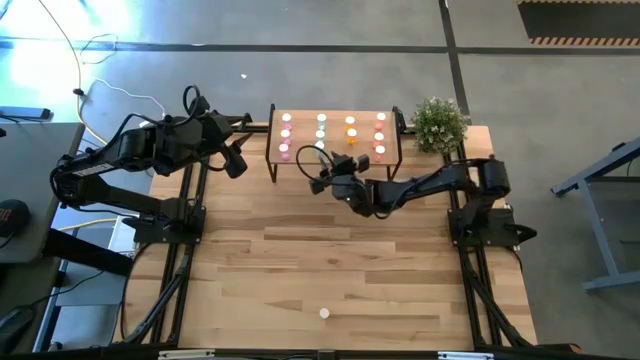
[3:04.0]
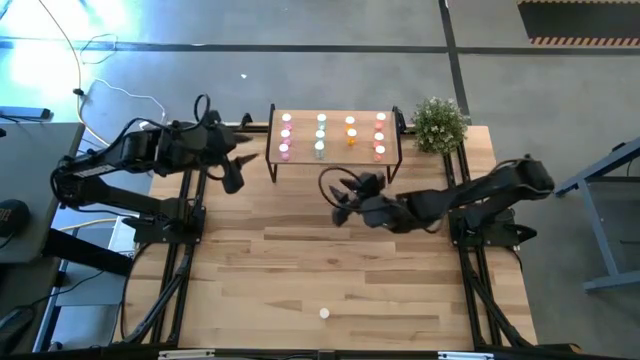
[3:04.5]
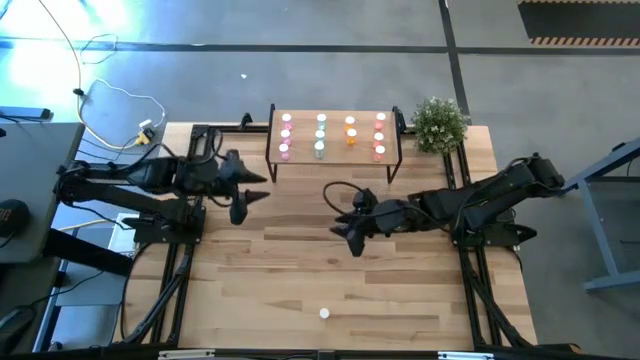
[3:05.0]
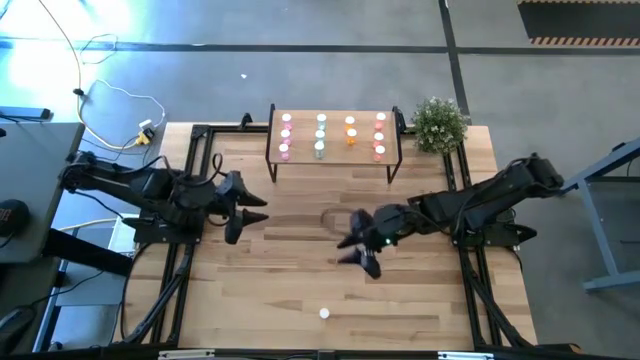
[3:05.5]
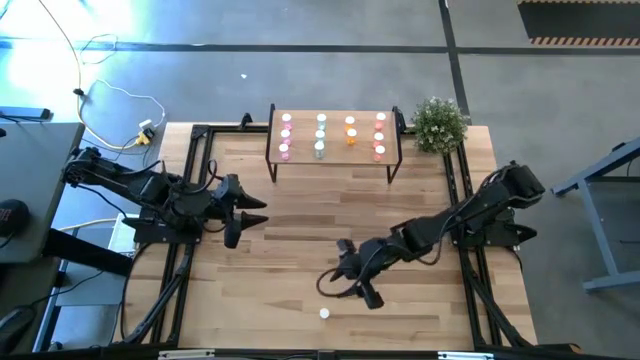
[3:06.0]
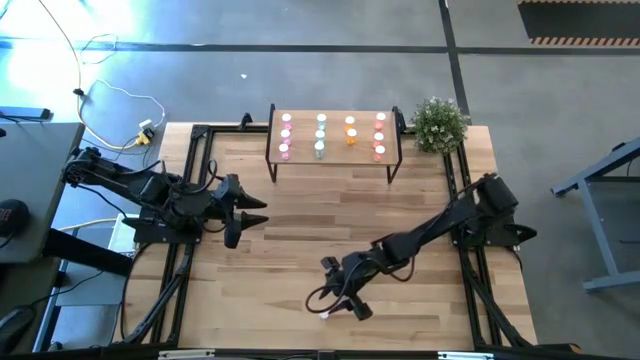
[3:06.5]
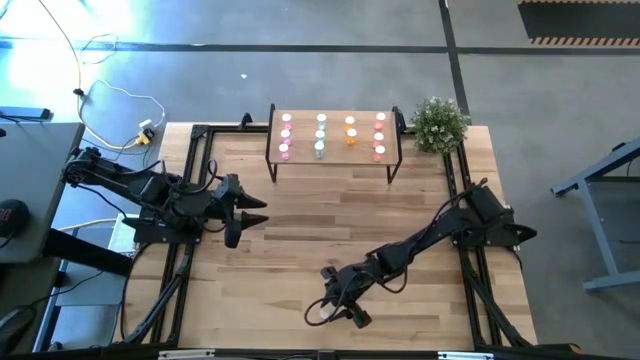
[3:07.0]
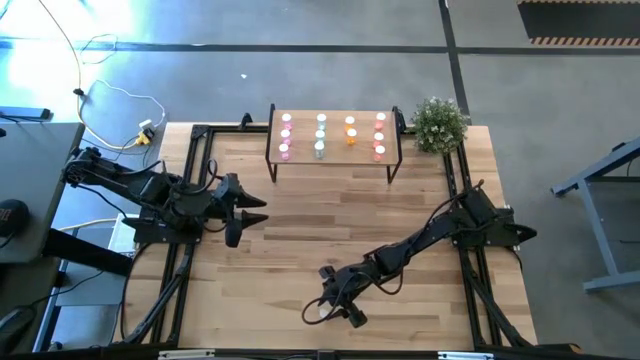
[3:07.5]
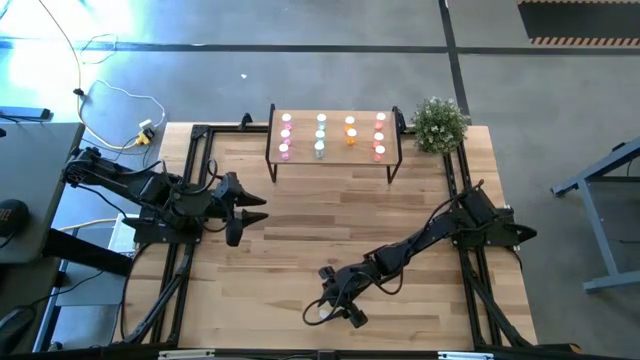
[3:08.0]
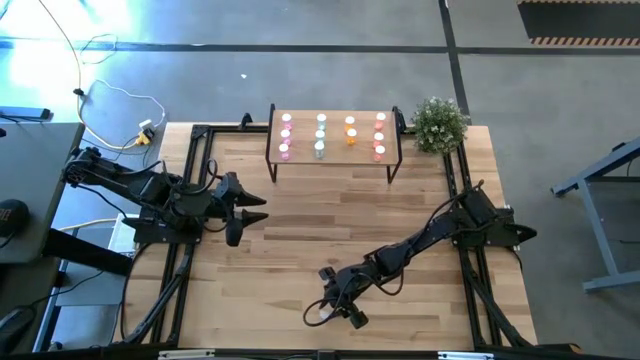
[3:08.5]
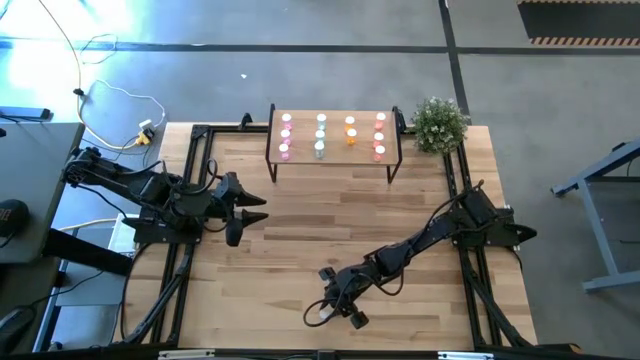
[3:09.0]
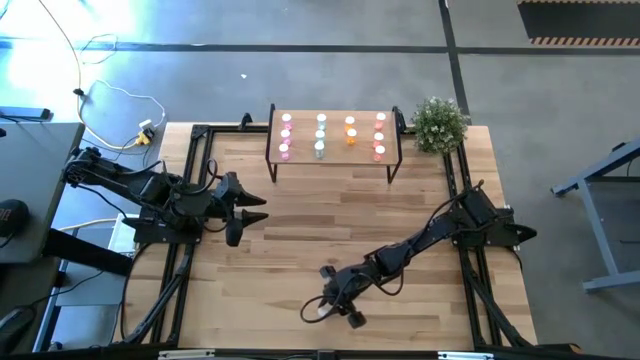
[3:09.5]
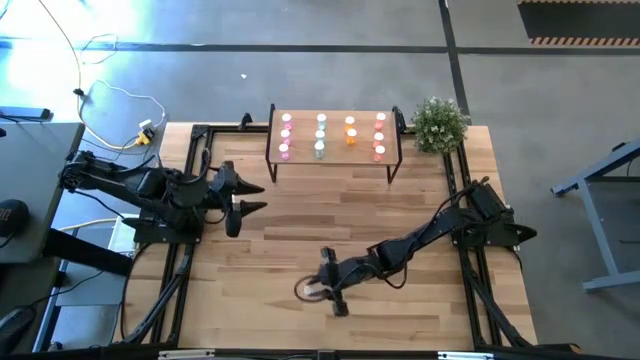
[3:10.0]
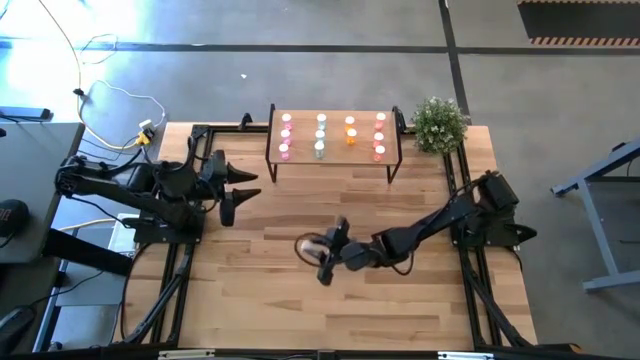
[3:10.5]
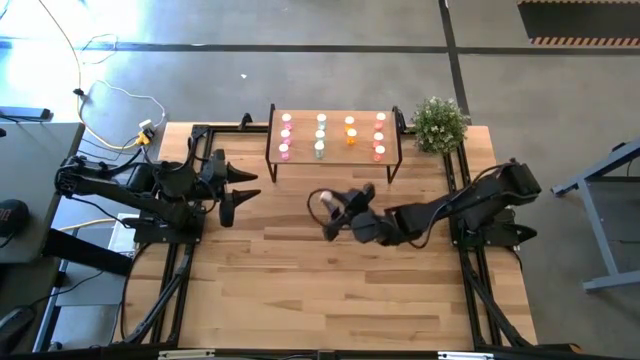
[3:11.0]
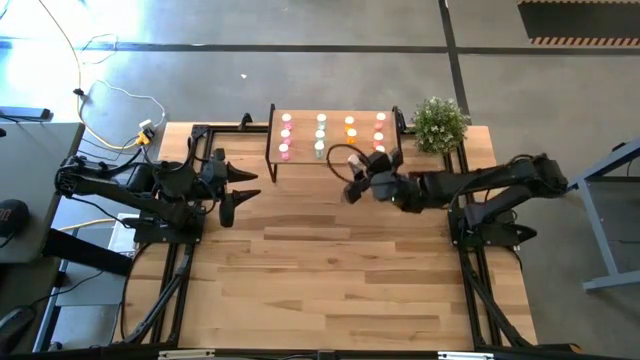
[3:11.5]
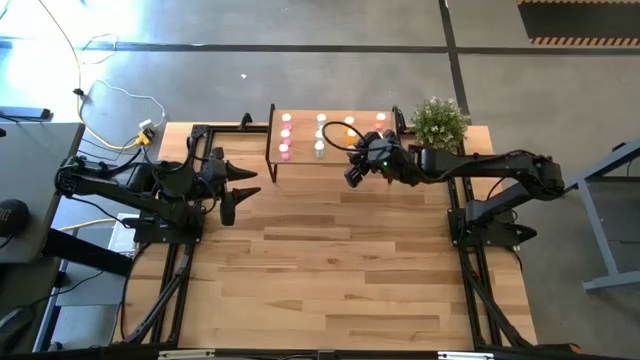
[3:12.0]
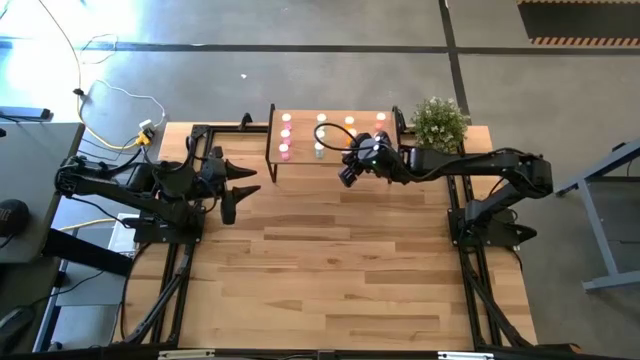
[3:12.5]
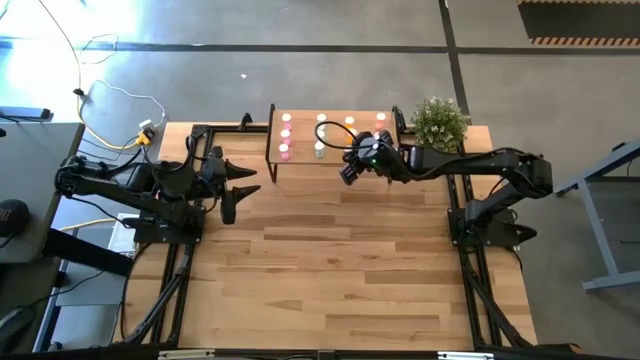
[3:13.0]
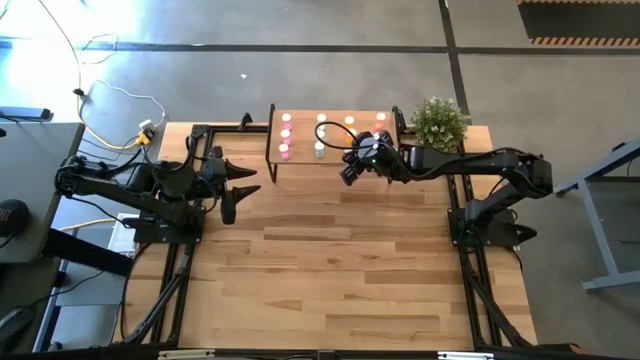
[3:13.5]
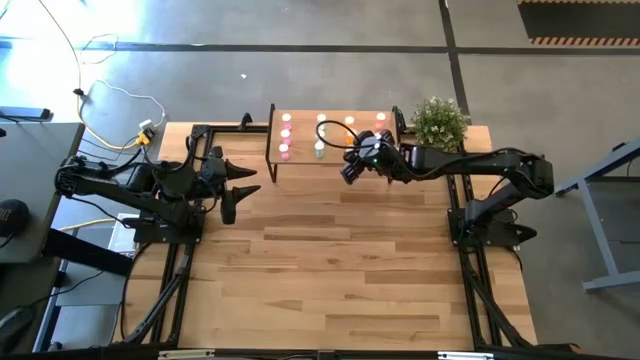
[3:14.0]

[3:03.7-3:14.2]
Task: Pick and place medicine bottles onto shelf by color
Put the yellow pill bottle on the shelf aligned with the yellow pill bottles

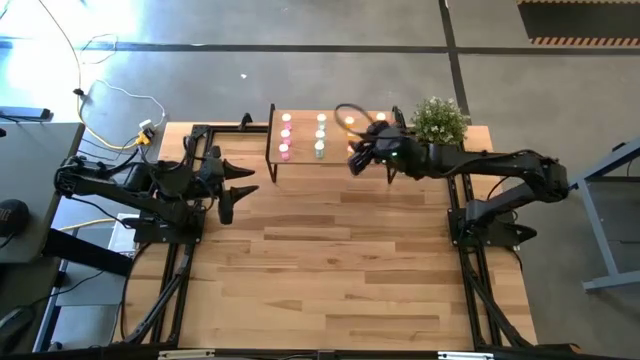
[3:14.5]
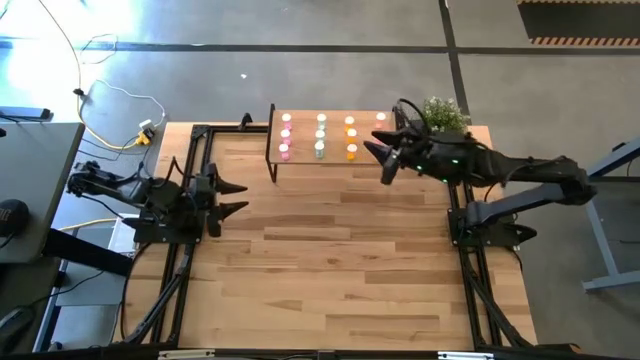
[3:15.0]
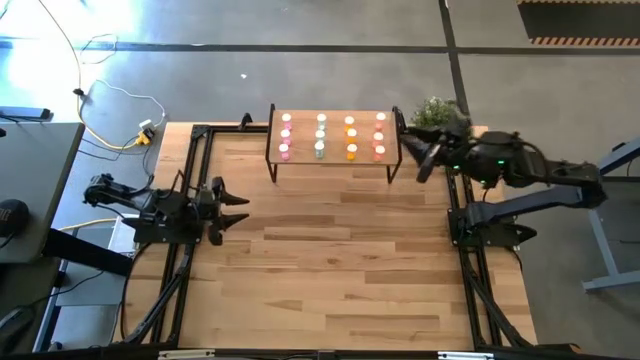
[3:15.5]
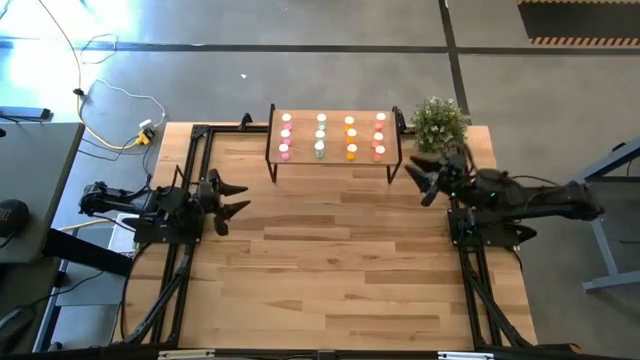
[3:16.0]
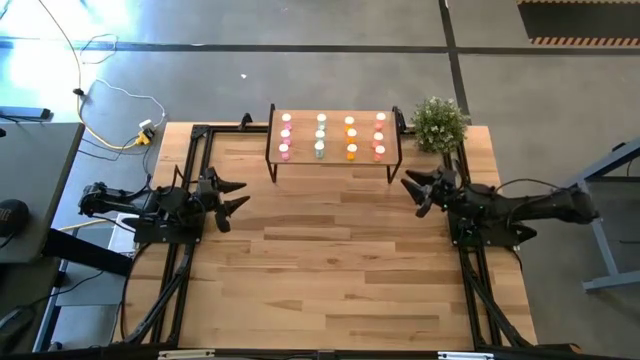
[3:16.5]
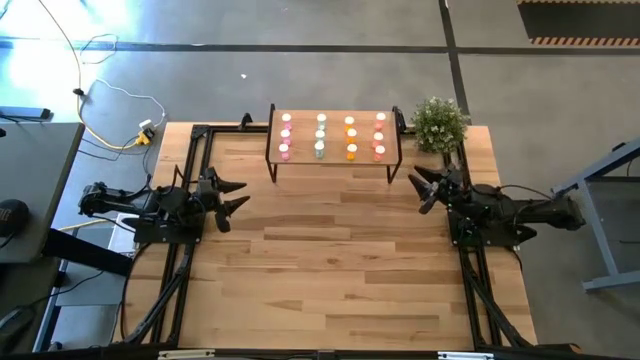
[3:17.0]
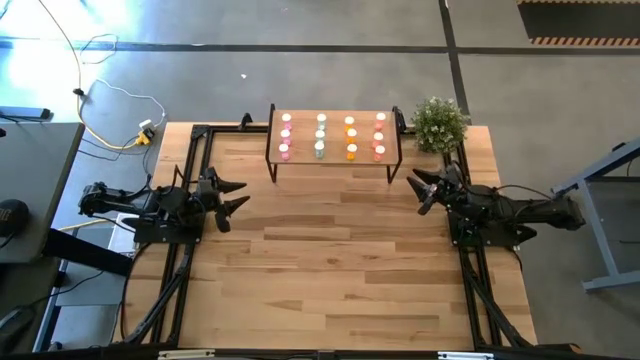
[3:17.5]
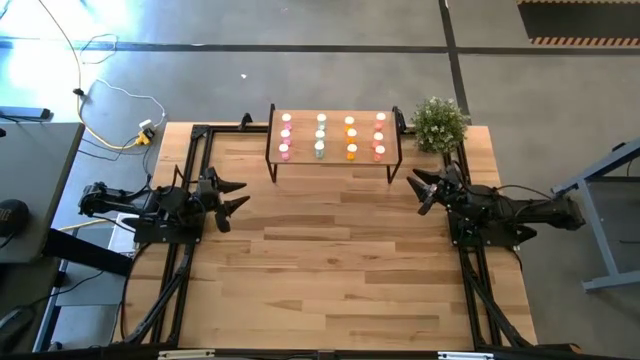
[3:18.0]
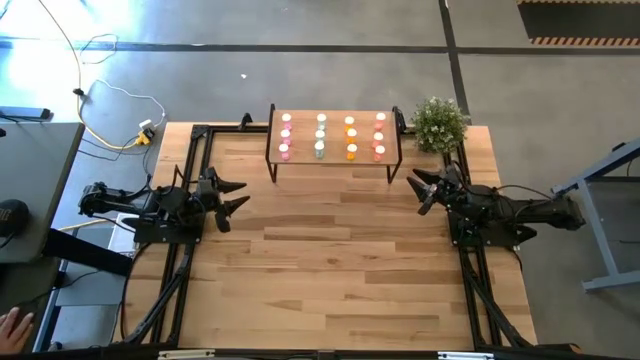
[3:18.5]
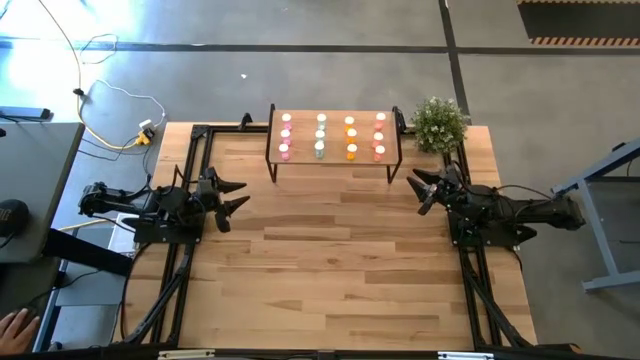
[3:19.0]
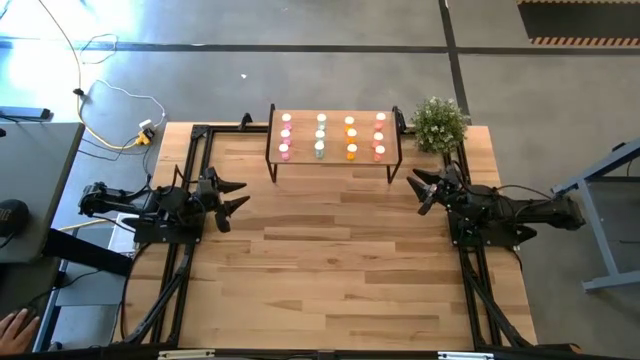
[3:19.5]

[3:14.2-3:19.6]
Return to Home Position

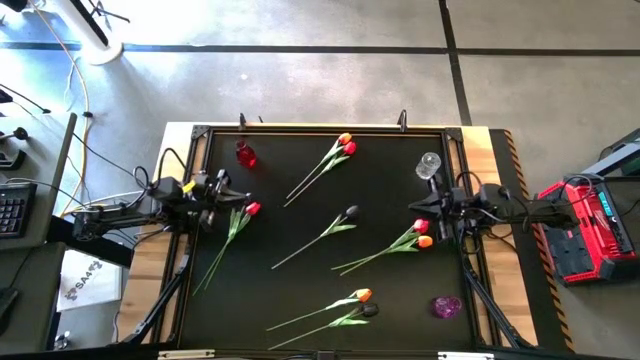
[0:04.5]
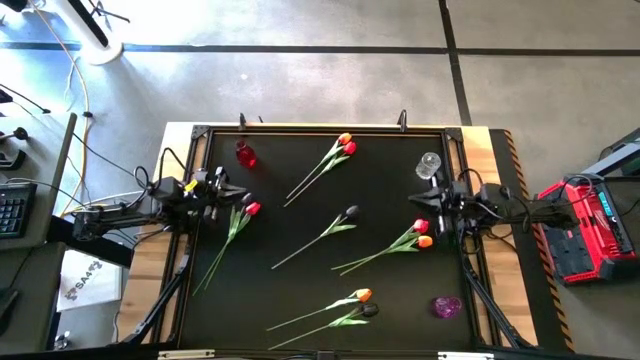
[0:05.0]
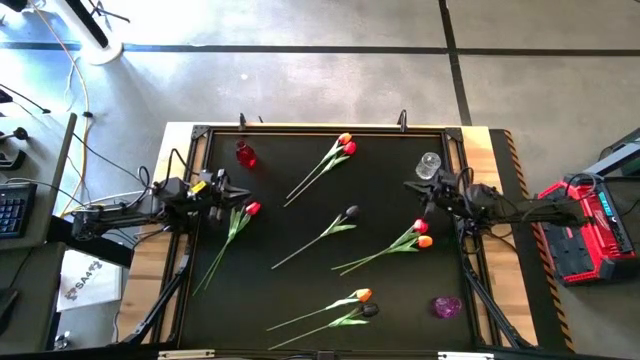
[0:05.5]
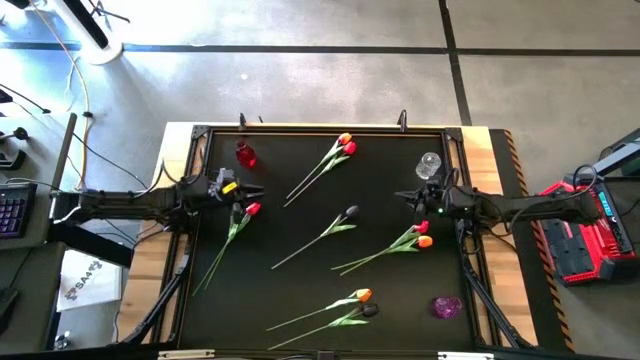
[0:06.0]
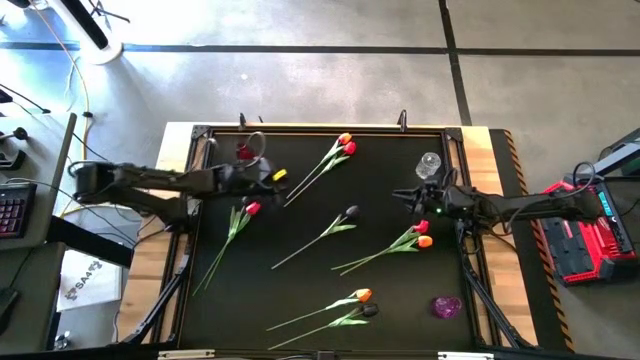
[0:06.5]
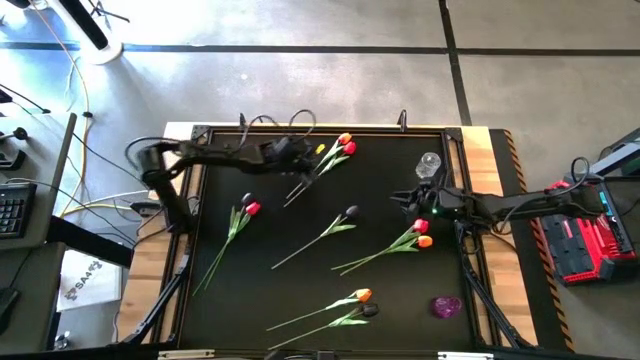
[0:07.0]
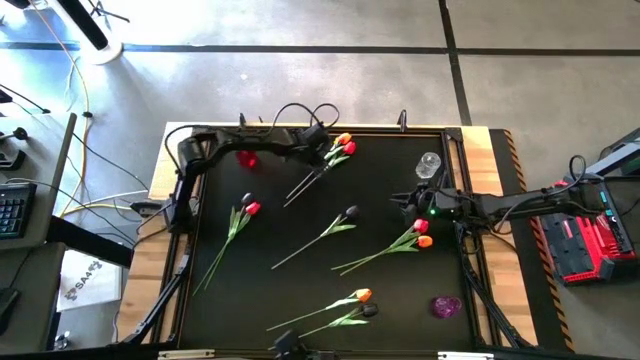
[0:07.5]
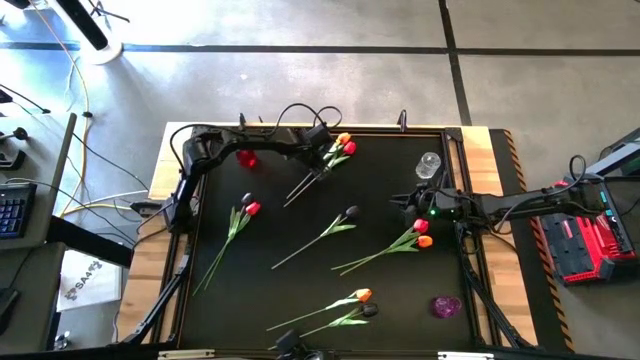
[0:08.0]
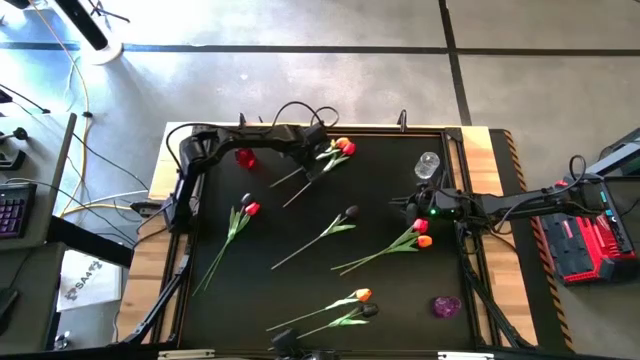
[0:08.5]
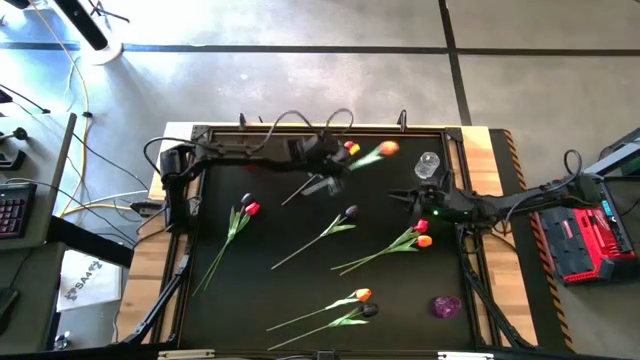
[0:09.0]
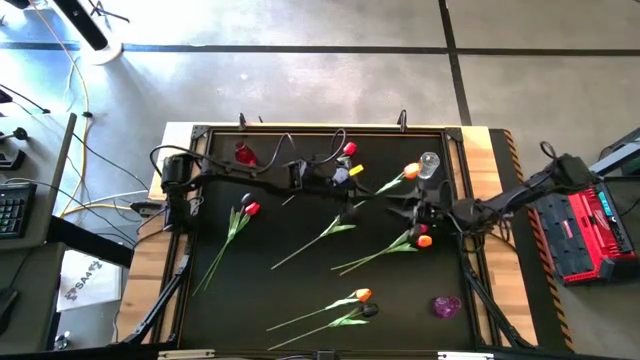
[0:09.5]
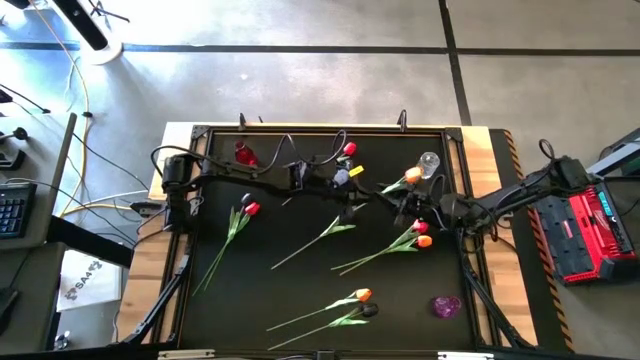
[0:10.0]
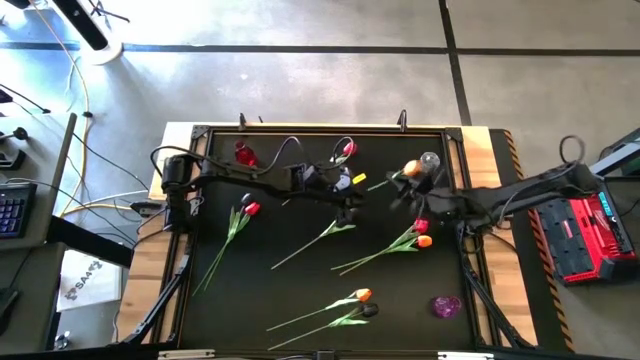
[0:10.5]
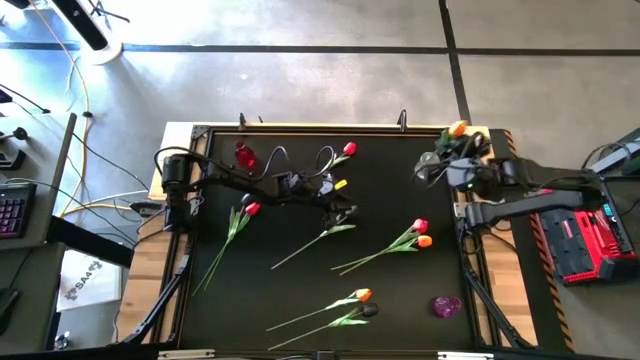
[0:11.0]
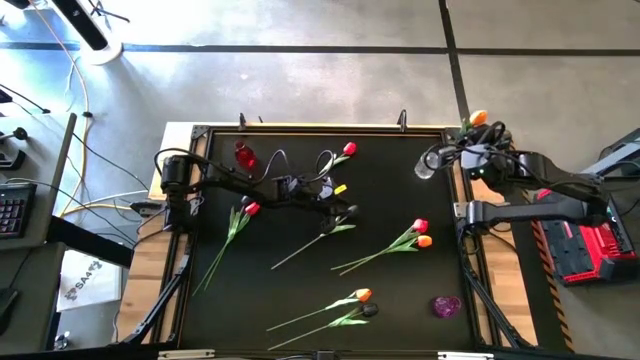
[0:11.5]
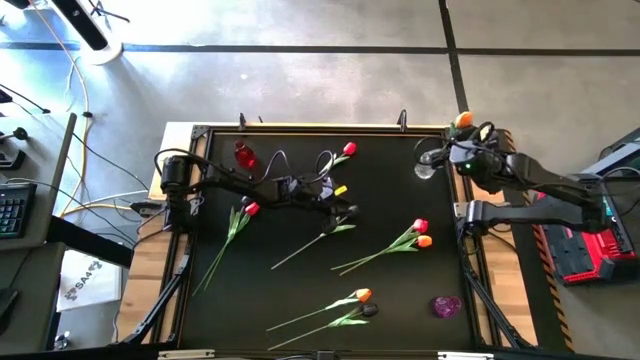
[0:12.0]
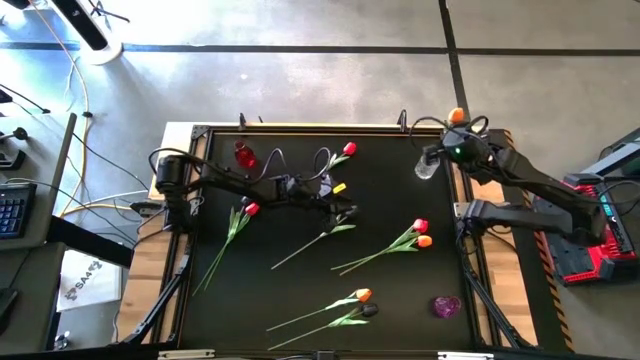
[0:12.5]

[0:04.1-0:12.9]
Task: Sort flowers into vase by color
Put the top orange tulip into the transparent vase
